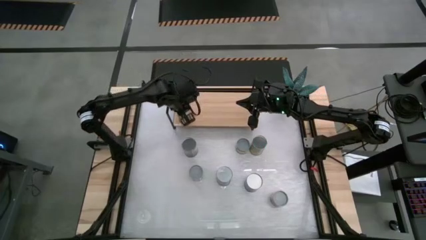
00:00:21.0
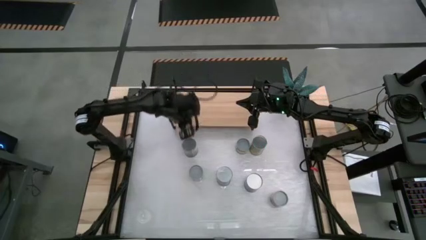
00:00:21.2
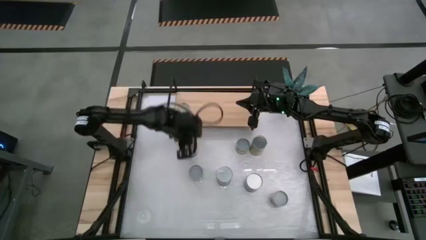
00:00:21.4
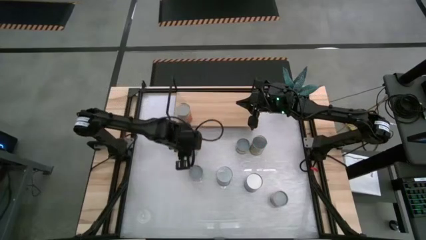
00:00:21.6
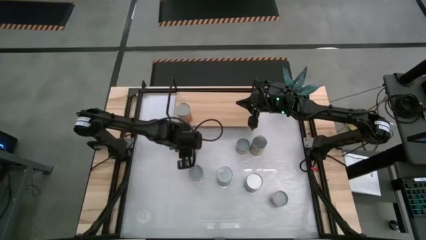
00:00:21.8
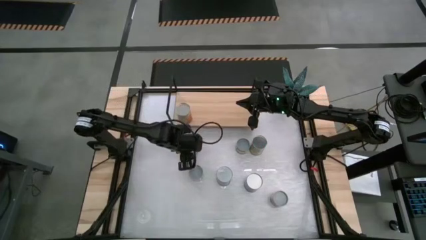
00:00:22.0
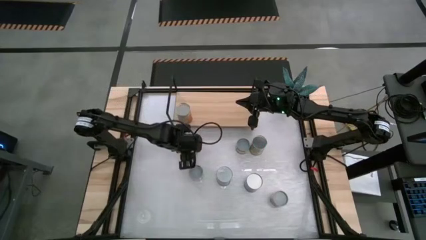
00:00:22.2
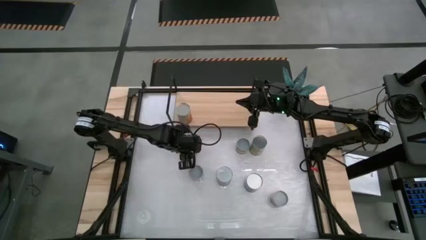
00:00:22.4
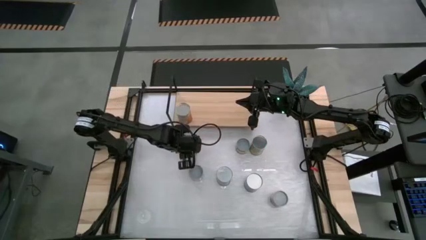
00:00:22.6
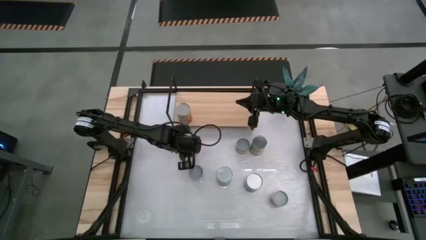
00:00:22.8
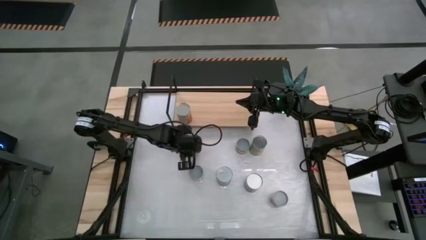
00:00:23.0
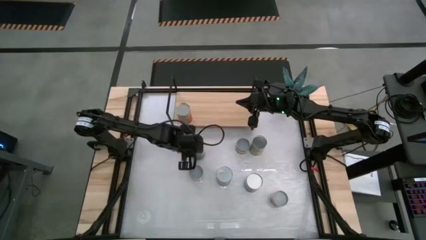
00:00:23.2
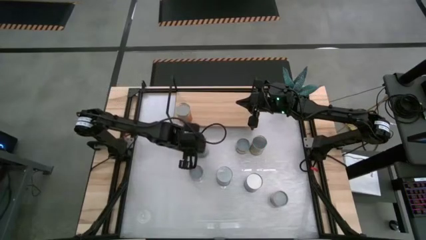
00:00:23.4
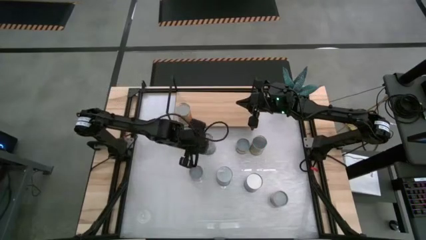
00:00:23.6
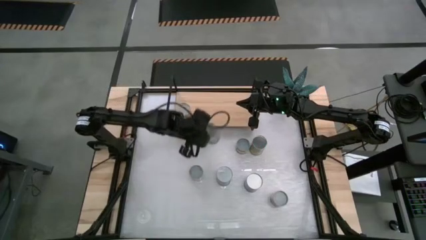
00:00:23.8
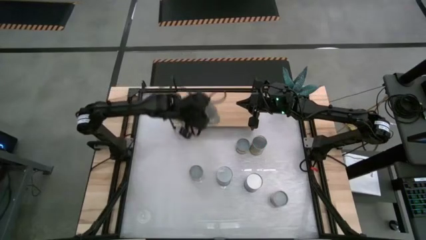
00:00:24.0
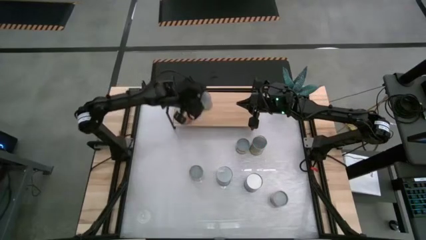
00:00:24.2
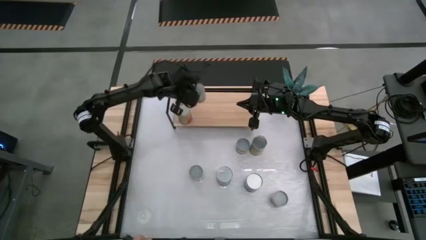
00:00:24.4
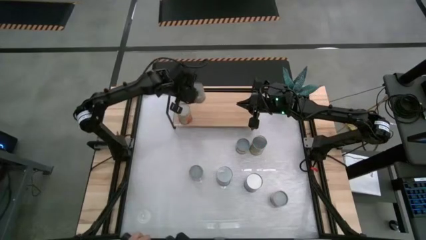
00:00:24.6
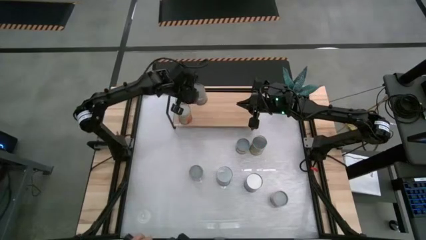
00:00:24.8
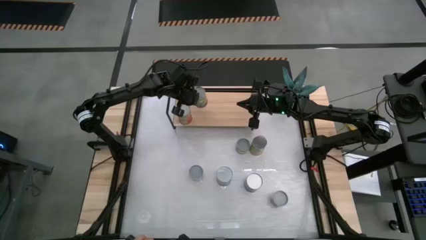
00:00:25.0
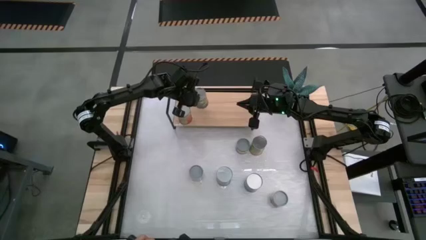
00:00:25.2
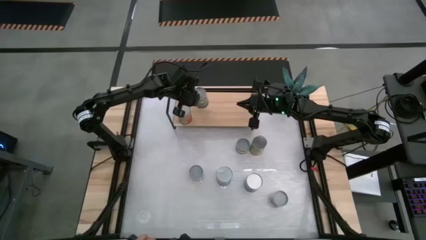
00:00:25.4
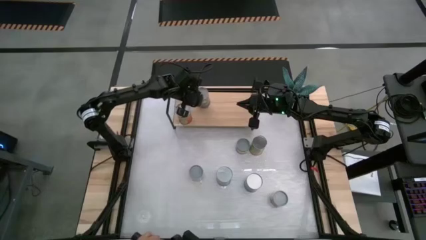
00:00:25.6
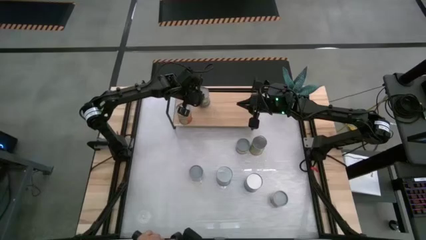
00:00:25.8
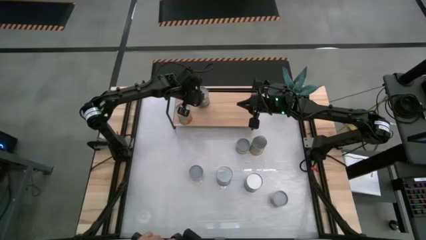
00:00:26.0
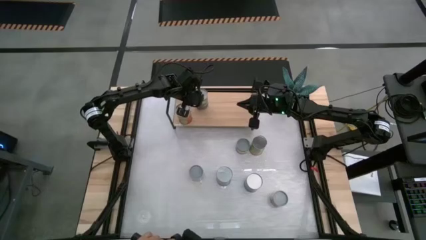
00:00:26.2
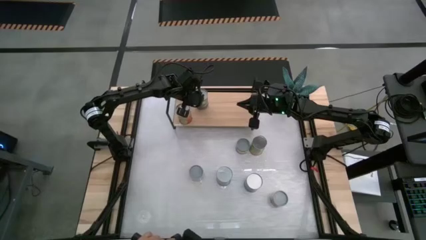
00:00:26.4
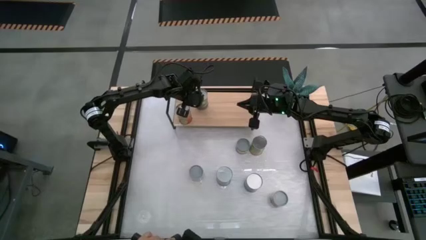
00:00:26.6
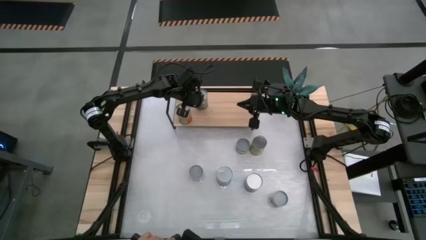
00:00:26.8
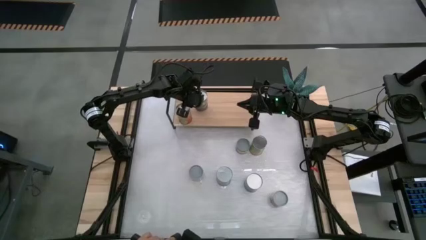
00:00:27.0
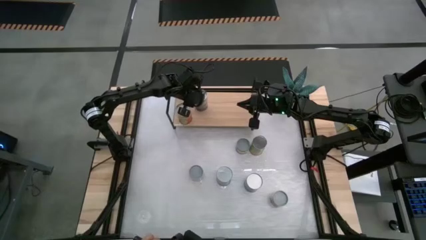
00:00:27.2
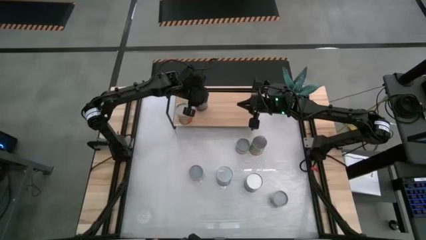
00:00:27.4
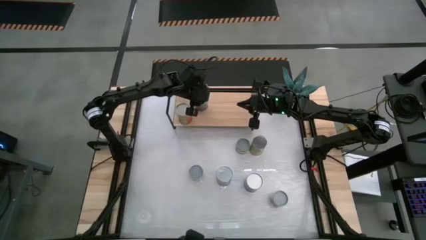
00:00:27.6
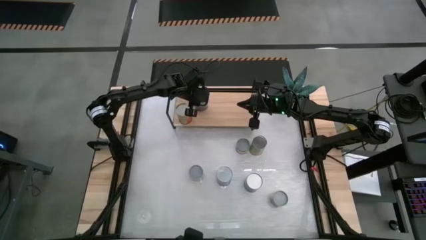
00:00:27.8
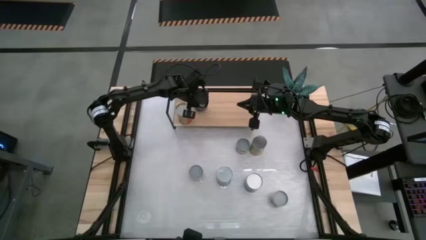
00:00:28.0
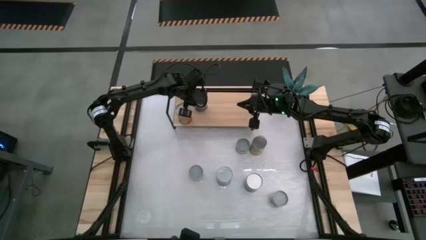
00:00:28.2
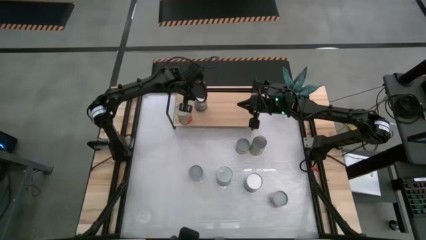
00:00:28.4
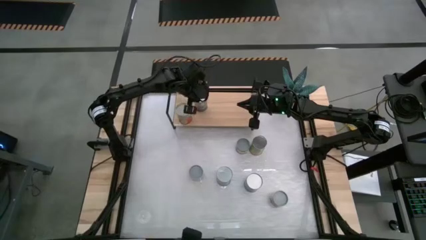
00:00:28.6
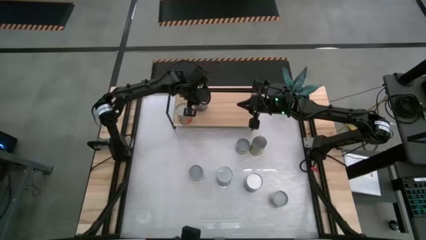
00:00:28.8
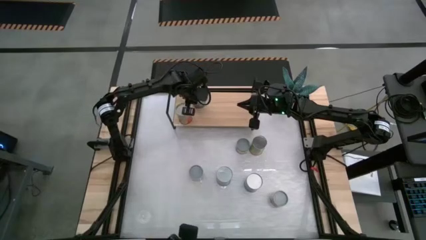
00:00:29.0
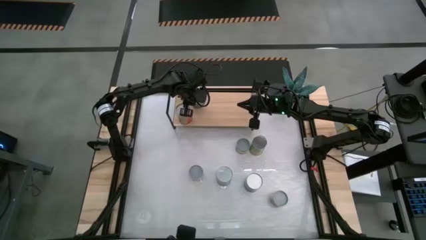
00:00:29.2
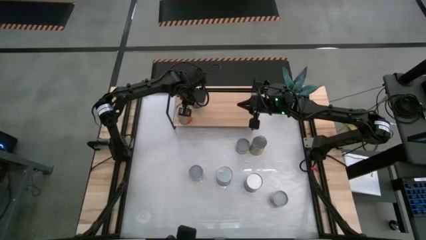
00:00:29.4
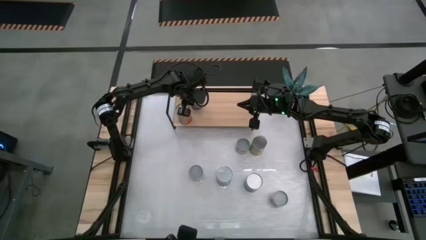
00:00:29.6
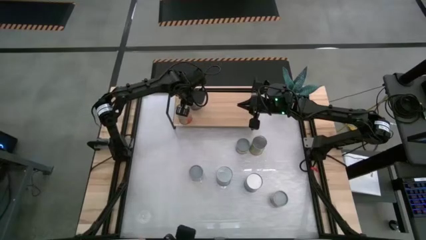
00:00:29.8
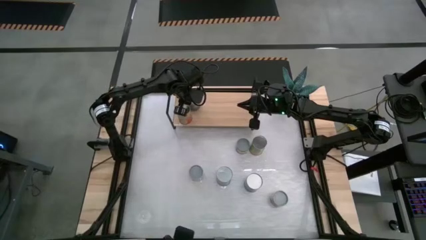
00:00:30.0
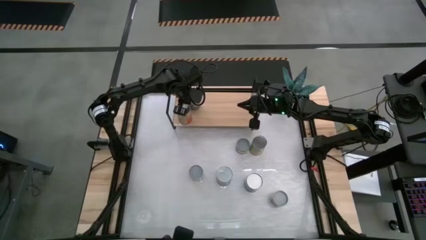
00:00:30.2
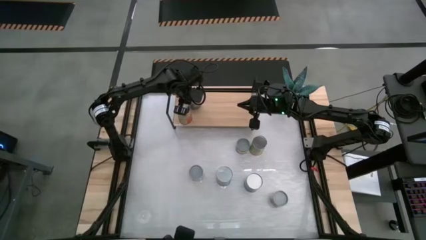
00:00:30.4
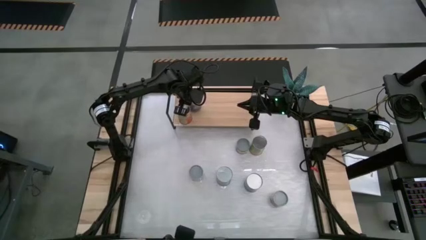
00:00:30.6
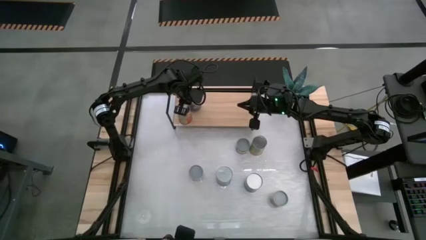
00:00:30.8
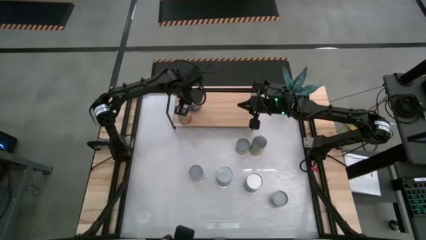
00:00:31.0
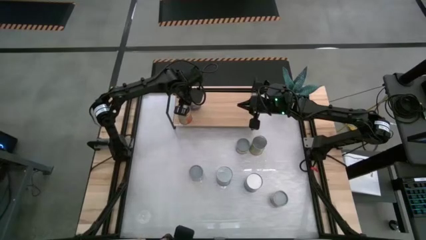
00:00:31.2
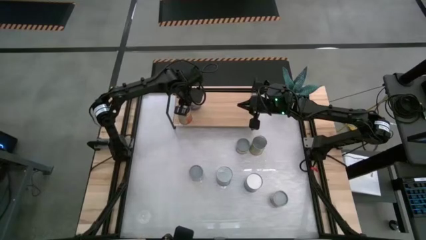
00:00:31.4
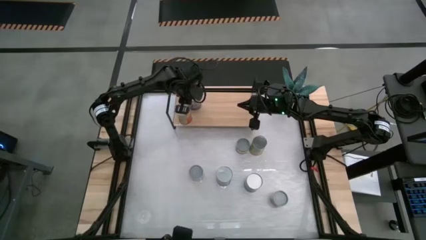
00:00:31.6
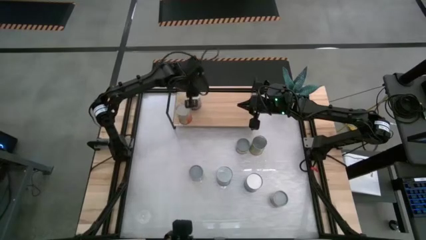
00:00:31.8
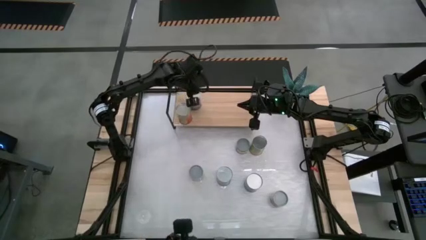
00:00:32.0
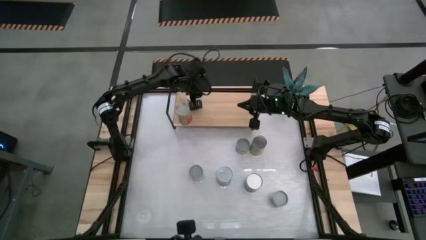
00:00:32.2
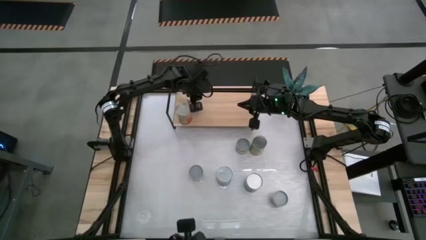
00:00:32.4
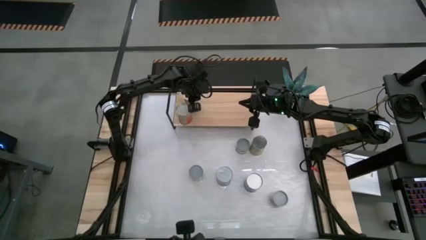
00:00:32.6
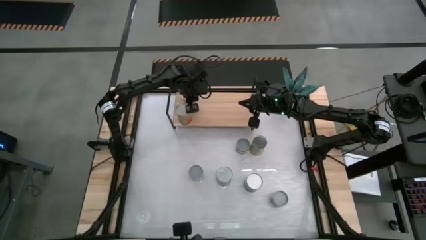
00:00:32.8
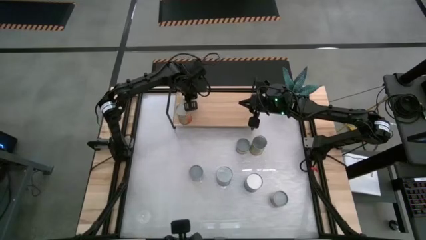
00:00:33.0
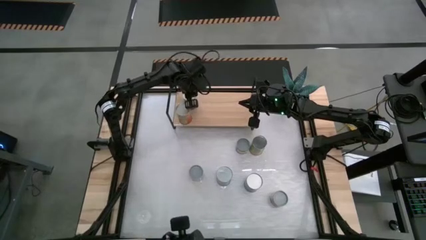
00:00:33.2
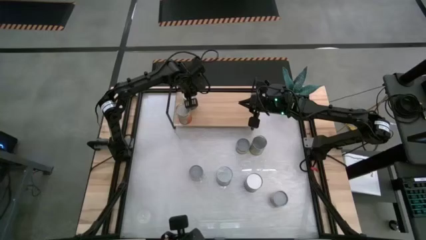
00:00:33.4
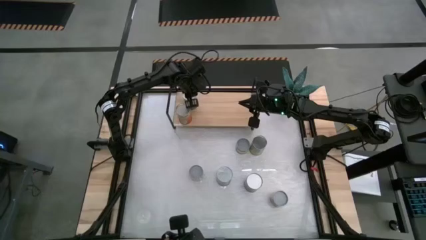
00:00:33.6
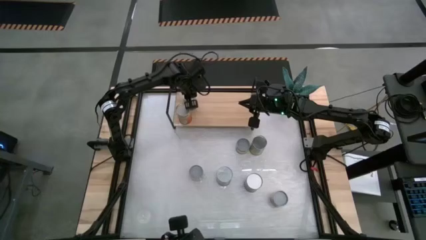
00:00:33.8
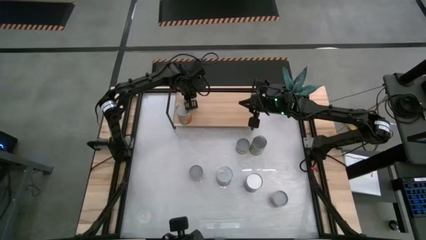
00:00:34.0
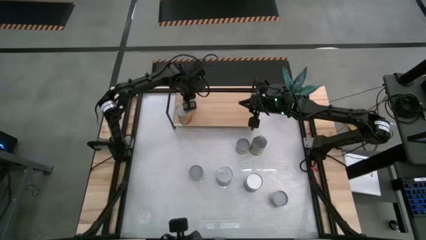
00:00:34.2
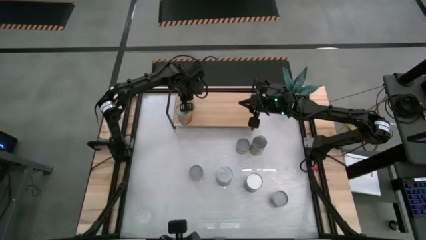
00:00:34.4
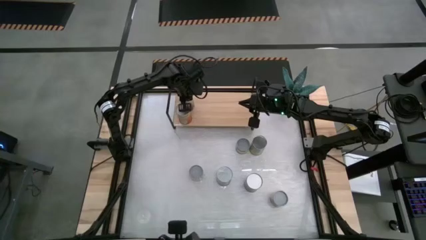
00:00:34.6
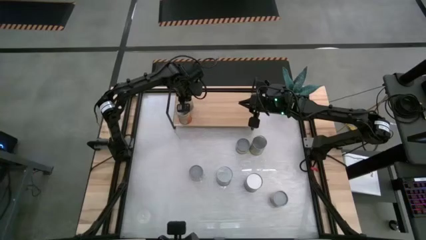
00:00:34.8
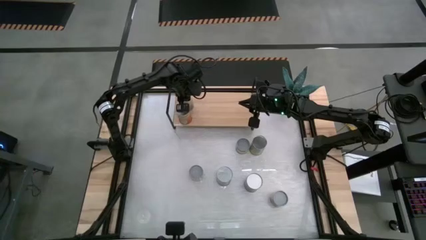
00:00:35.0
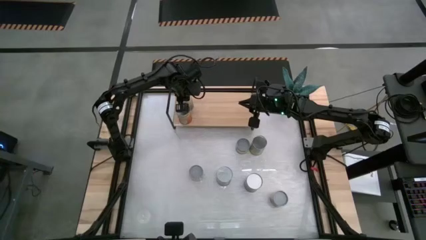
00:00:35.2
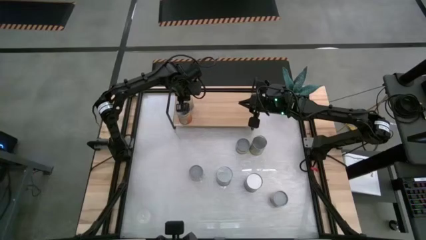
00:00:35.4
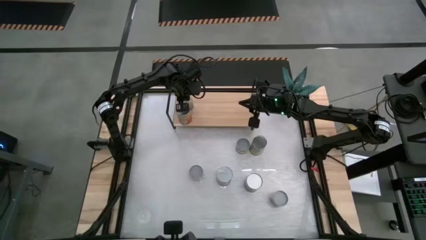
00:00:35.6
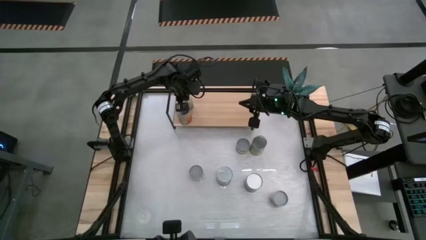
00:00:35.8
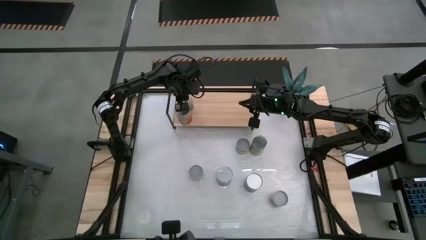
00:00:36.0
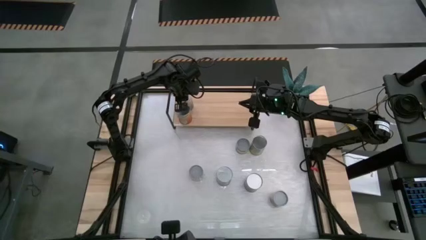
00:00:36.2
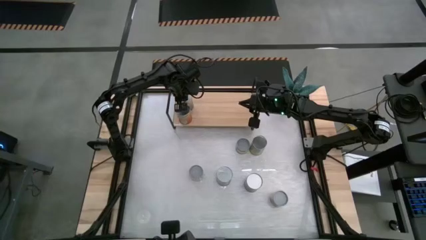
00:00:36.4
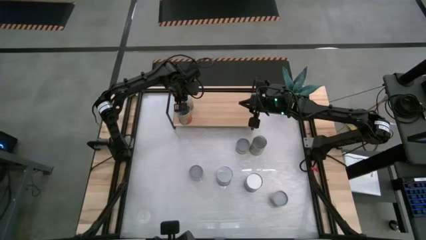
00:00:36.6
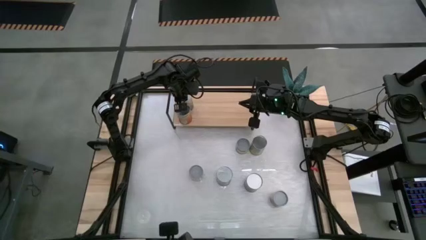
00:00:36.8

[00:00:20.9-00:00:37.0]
Task: Pick and place cans onto a shelf
Put the top canned peas on the shelf
